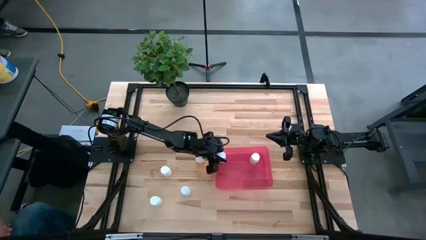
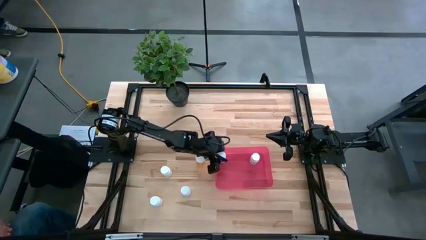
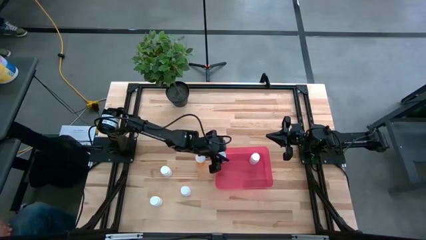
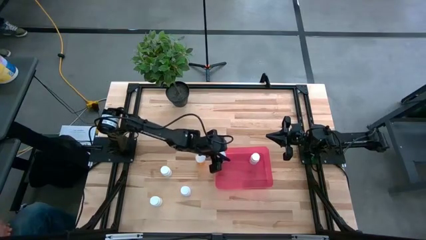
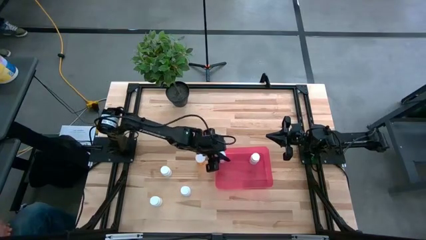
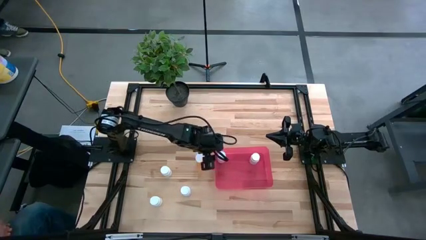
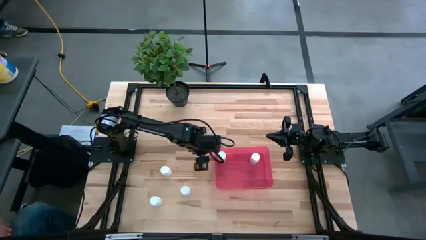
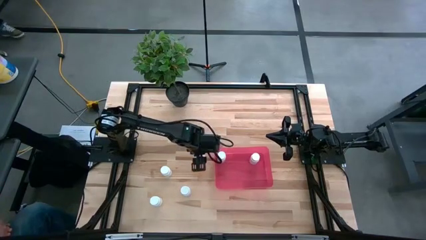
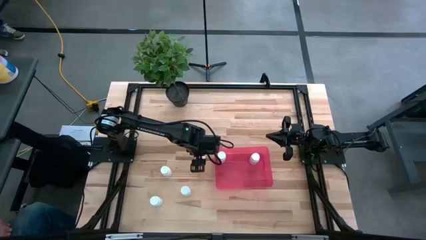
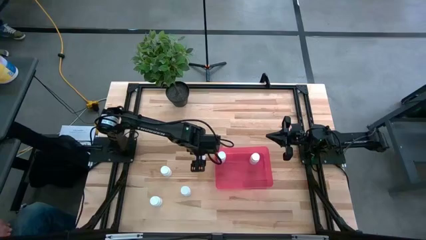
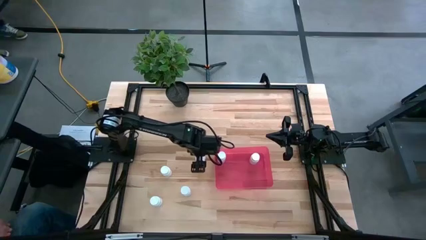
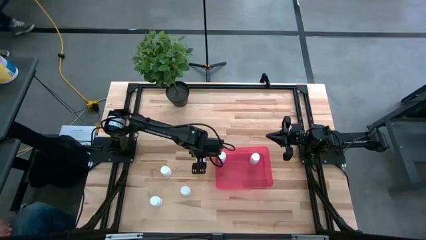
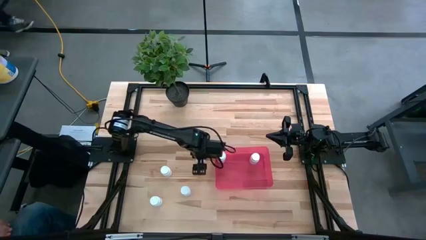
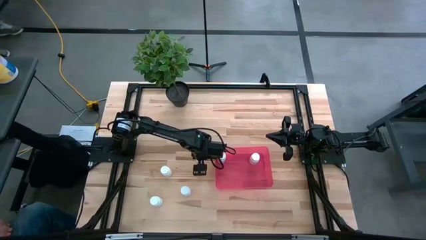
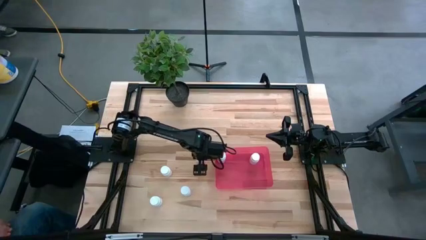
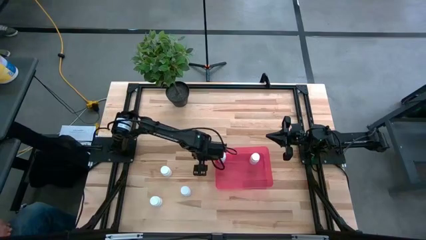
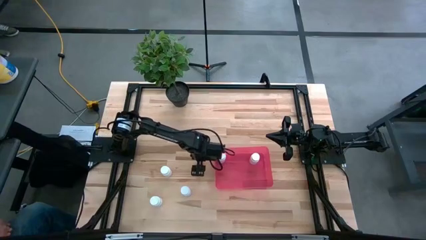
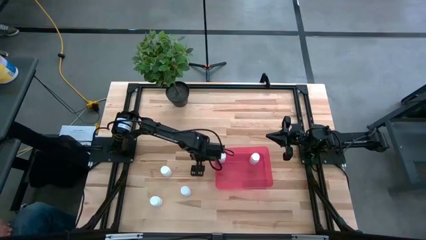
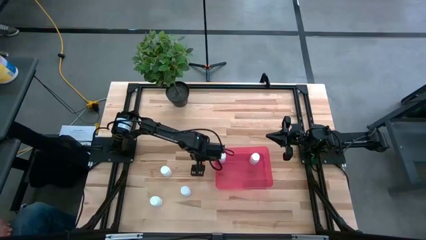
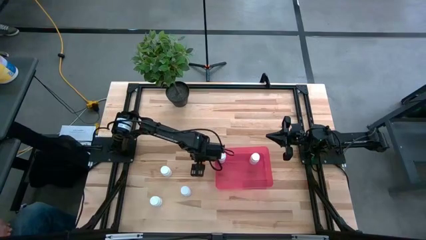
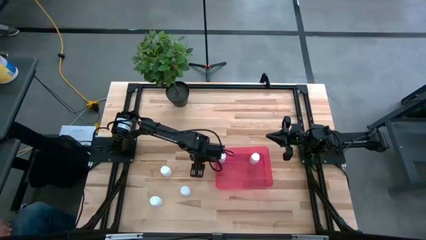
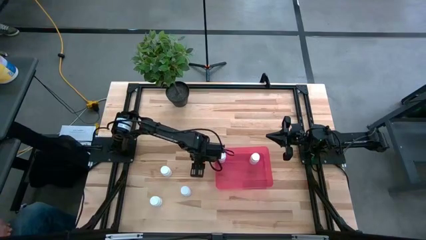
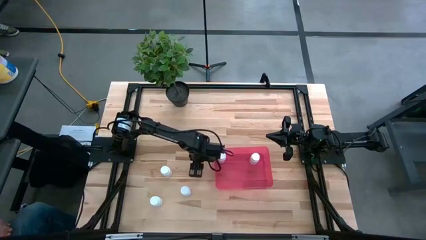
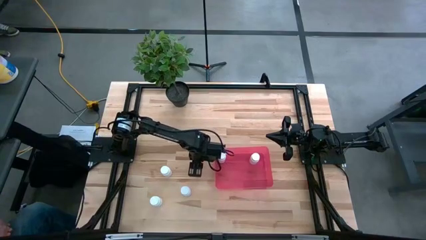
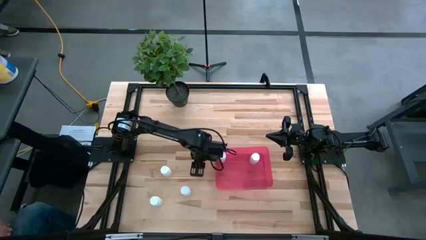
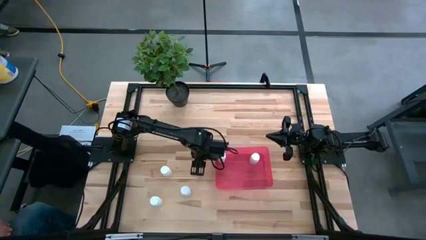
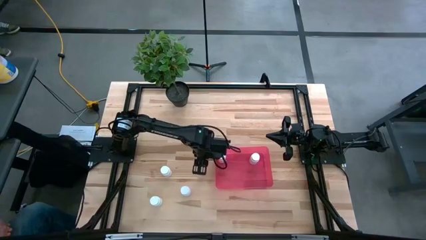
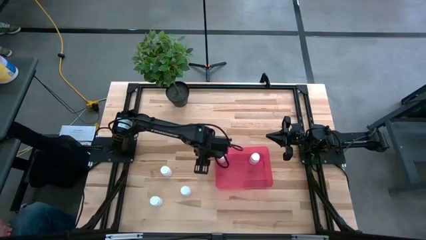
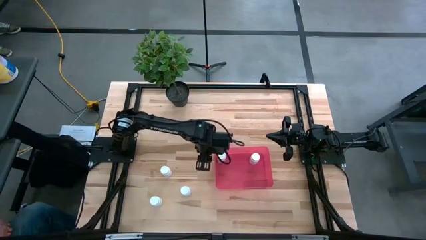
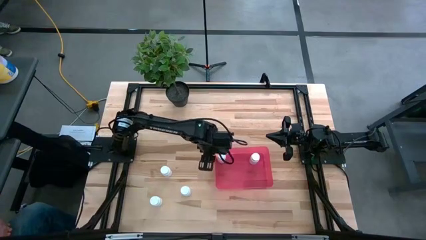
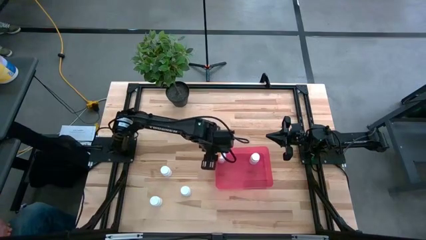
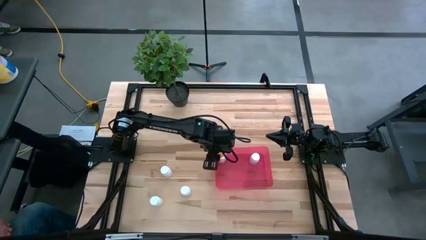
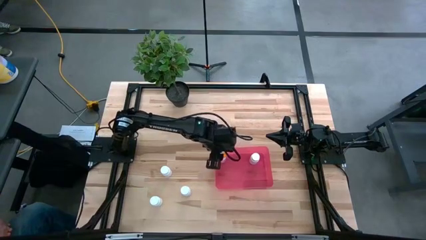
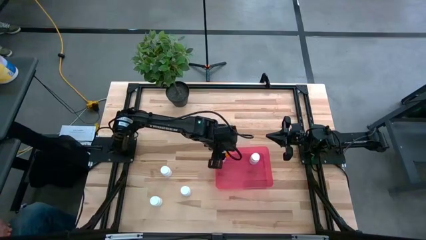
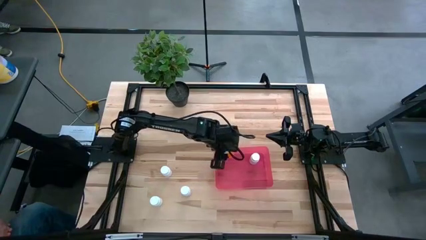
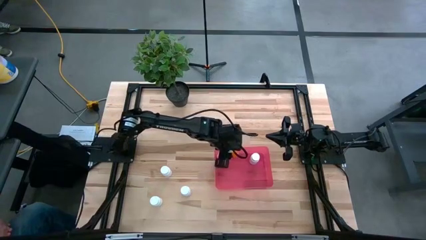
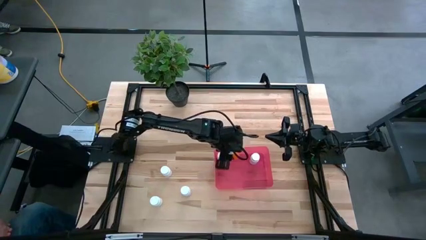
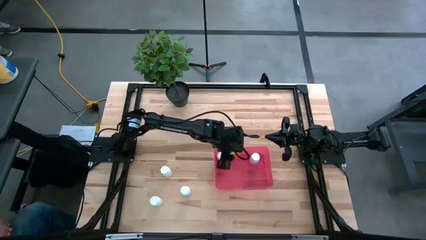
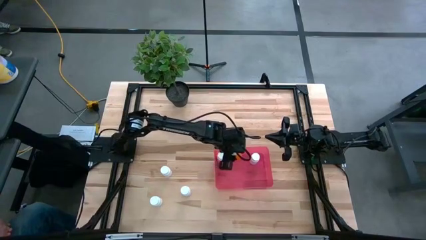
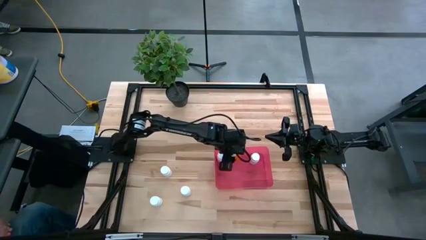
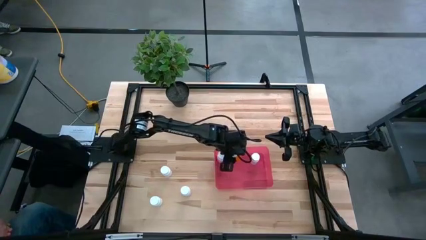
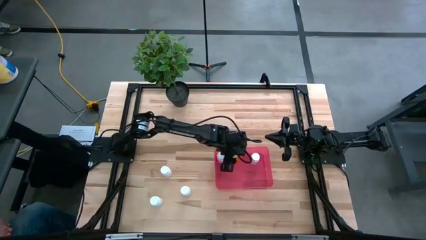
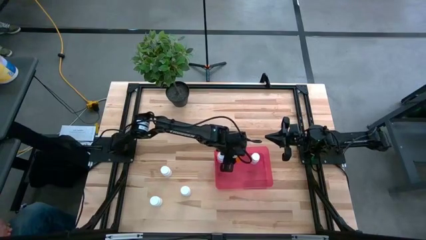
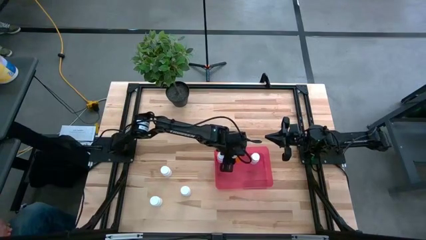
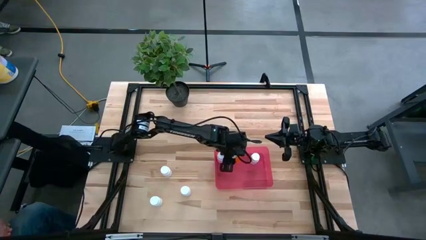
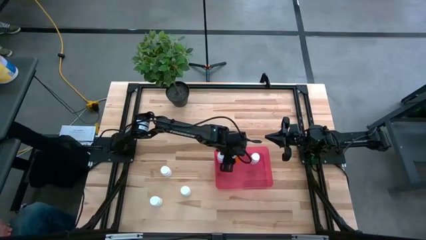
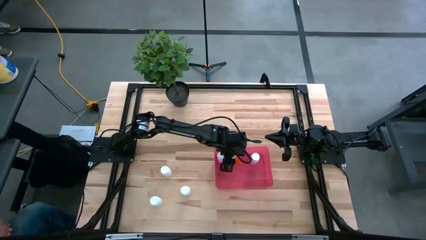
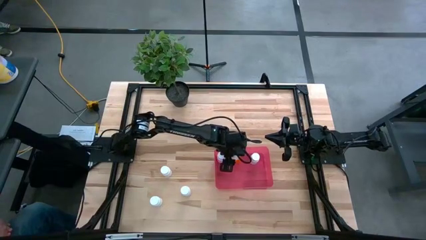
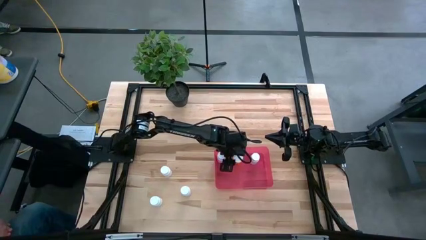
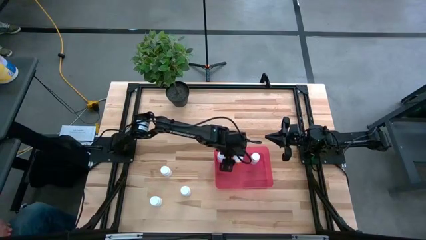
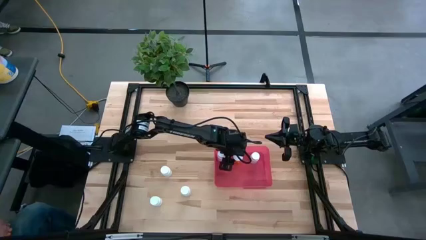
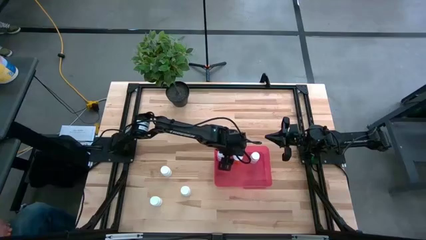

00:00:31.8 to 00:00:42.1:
Task: Pick and place pill bottles into a basket
Put the orange pill bottle into the pink bin

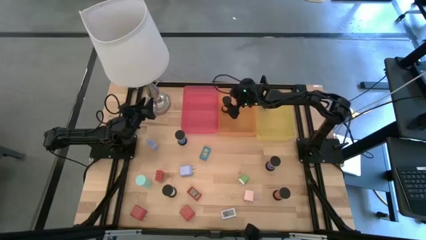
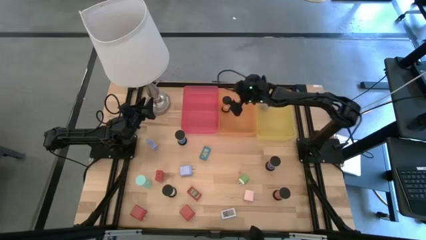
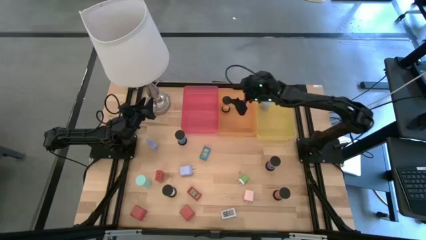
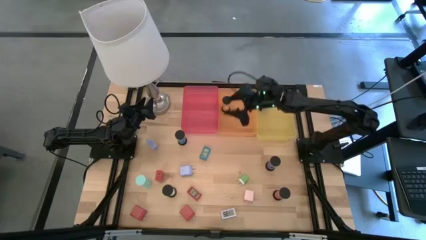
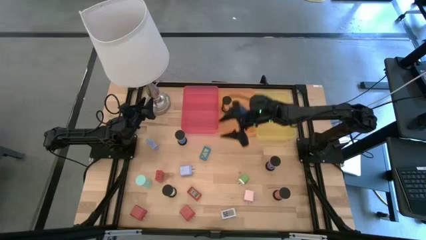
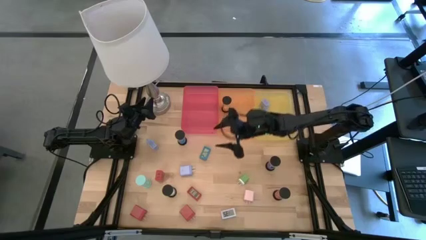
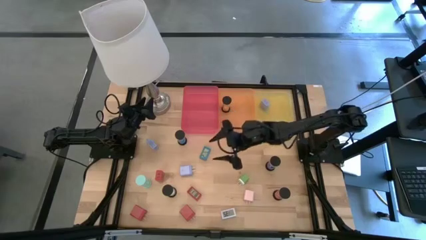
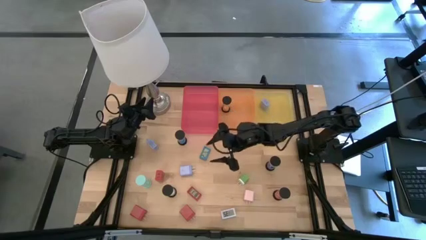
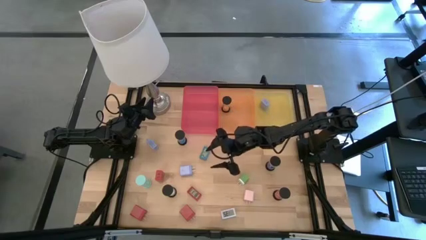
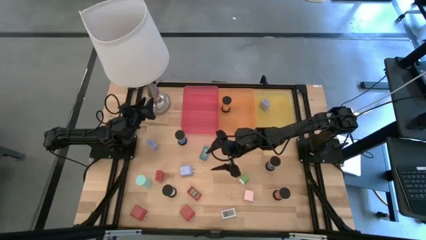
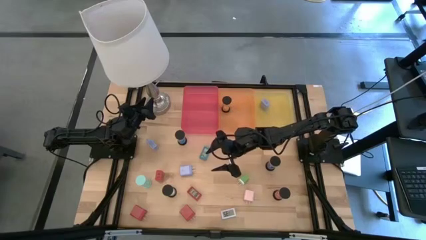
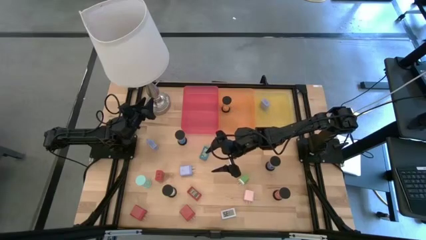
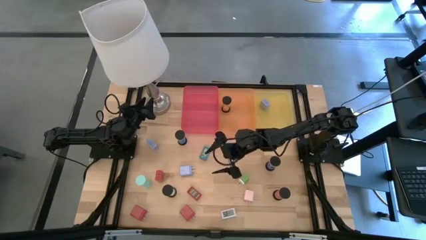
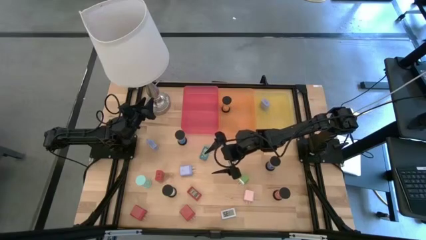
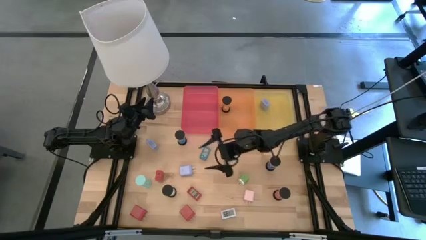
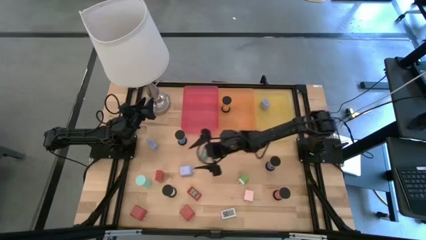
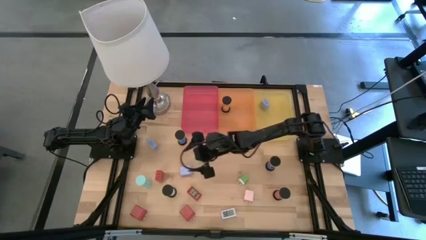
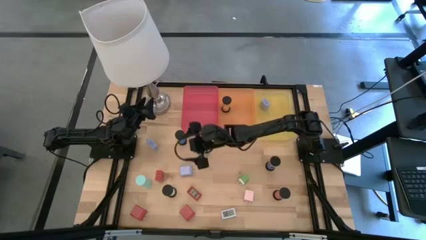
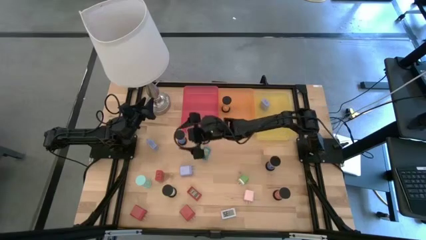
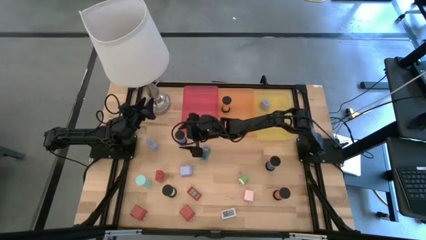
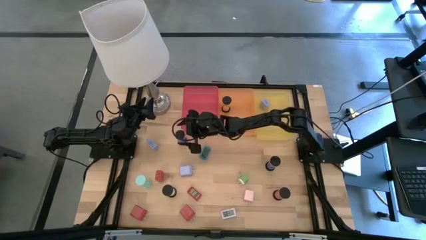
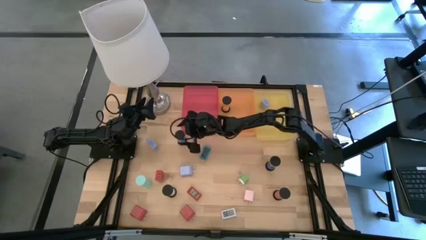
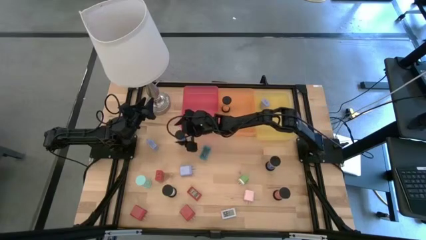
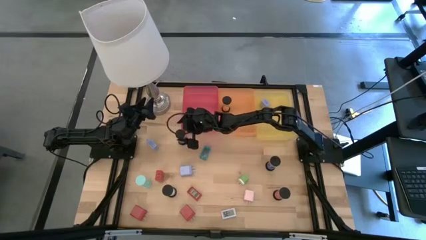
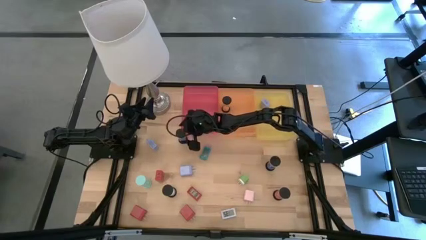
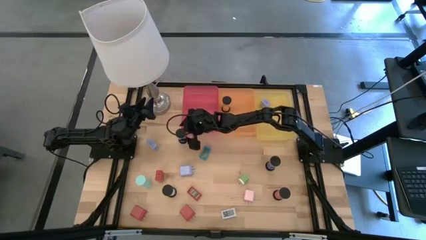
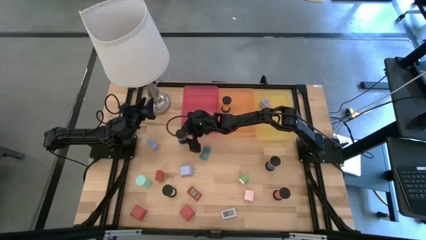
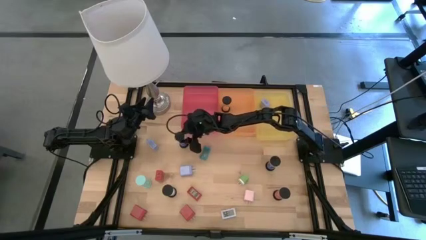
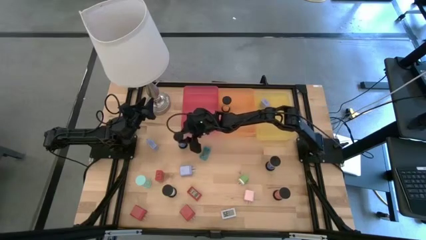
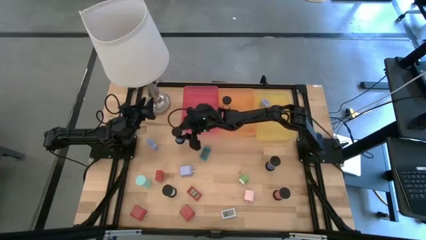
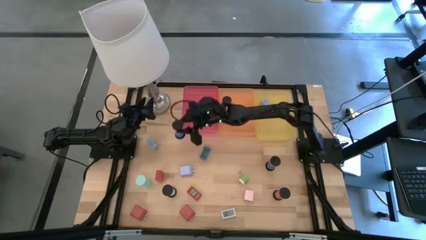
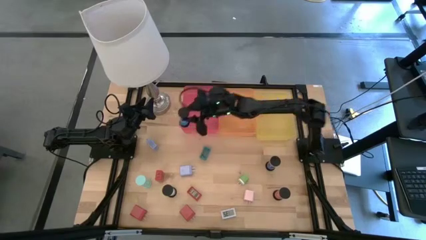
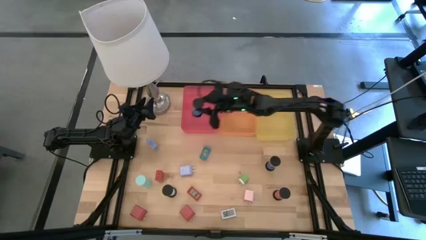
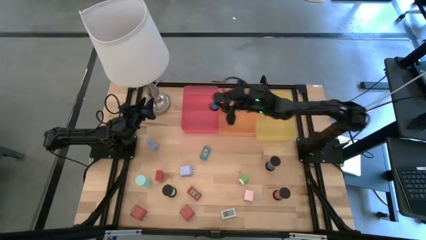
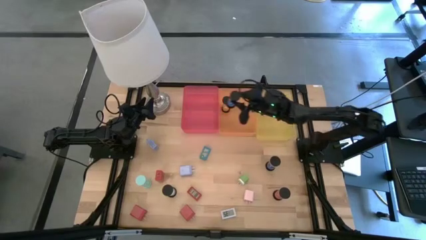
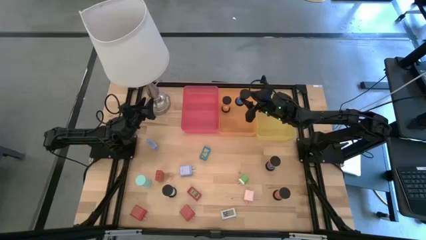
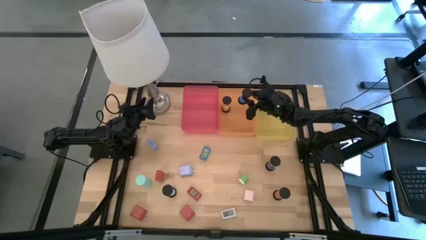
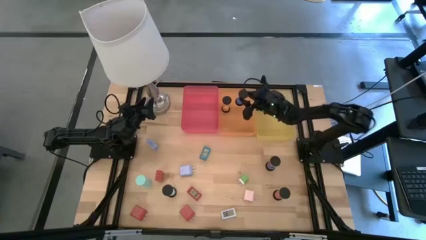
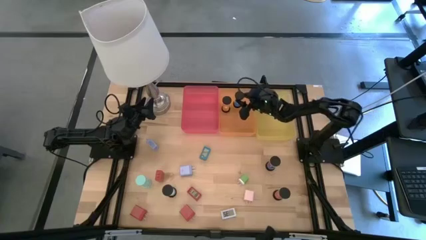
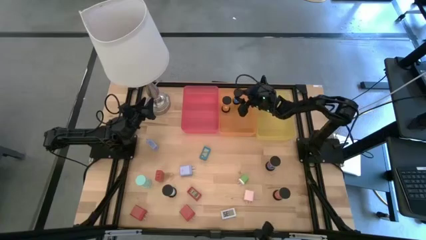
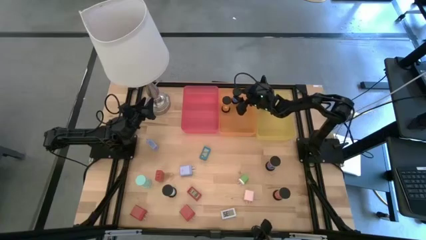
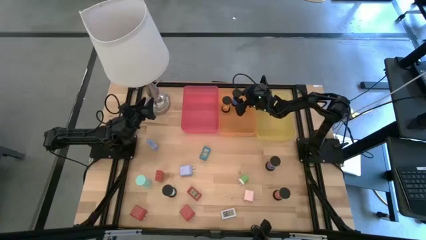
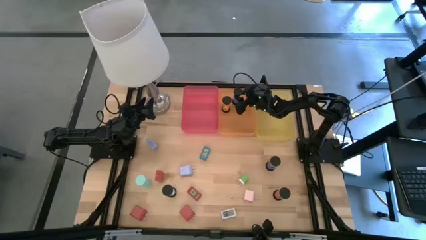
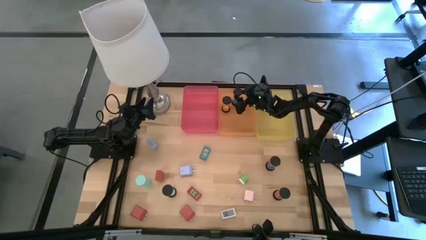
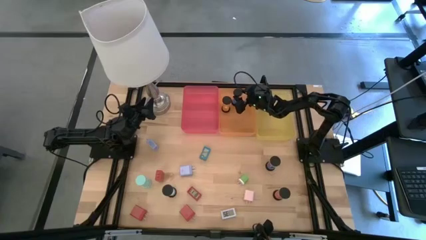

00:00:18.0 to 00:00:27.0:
Task: Pick & Place Office items
Put the top blue hourglass into the orange bin
